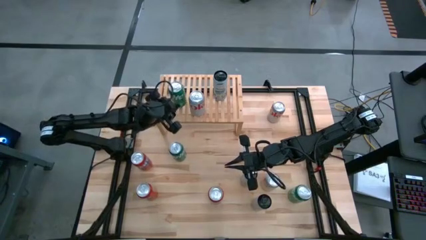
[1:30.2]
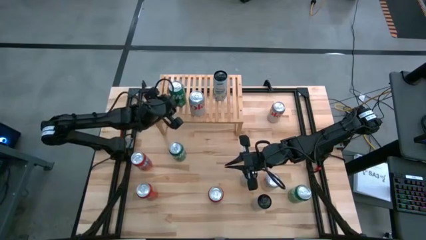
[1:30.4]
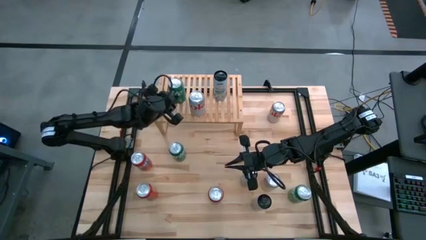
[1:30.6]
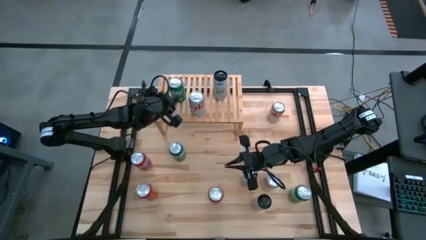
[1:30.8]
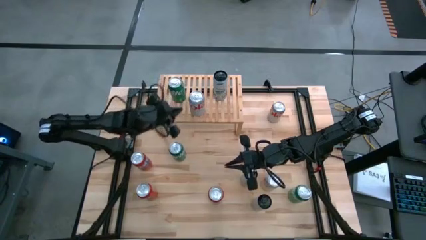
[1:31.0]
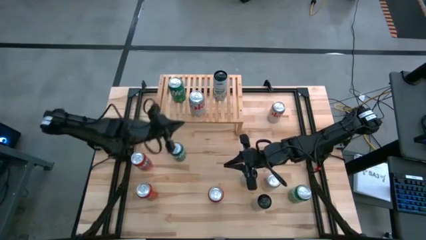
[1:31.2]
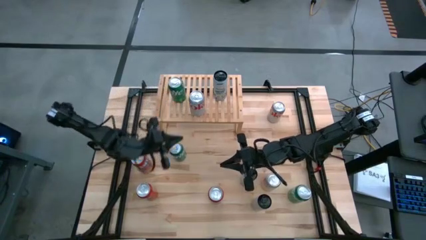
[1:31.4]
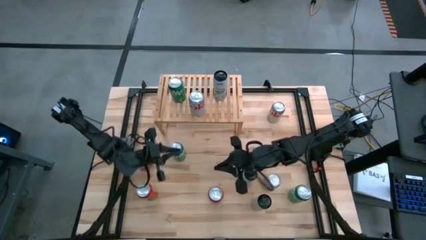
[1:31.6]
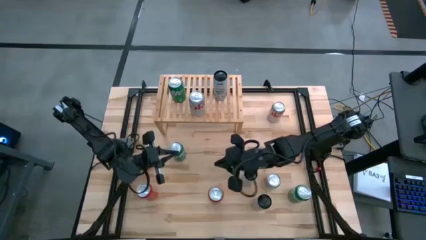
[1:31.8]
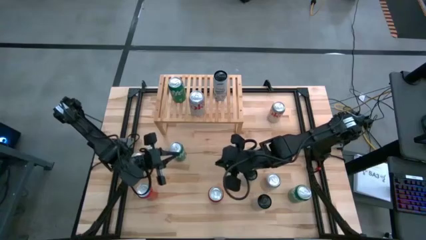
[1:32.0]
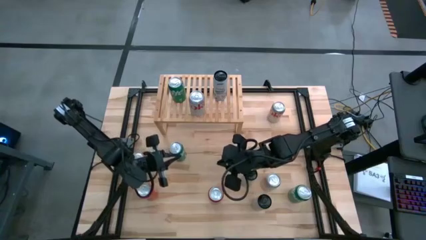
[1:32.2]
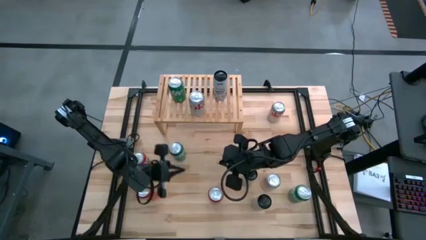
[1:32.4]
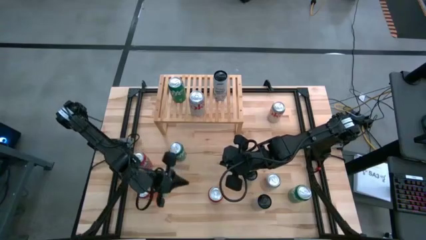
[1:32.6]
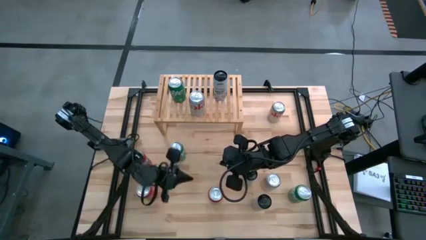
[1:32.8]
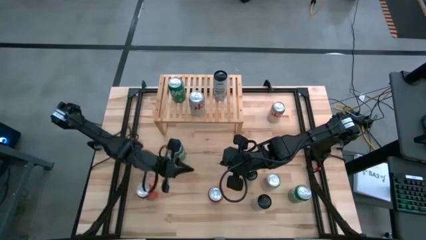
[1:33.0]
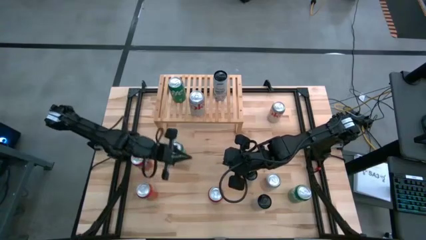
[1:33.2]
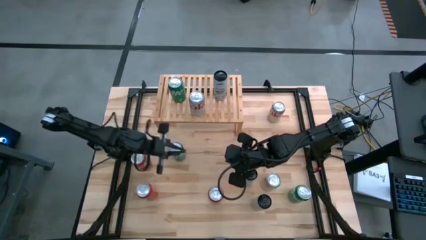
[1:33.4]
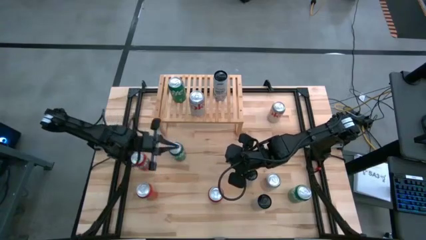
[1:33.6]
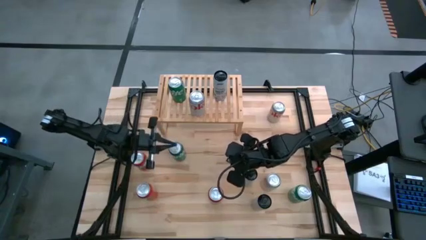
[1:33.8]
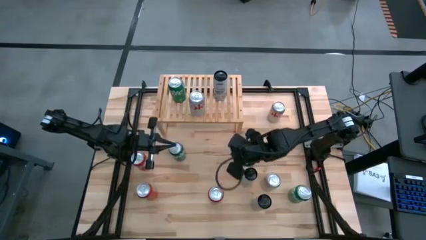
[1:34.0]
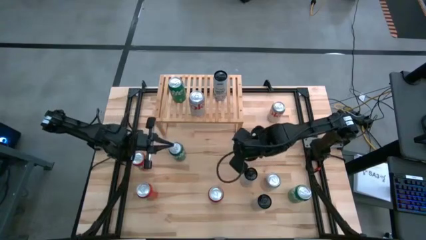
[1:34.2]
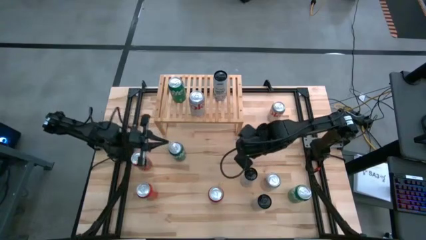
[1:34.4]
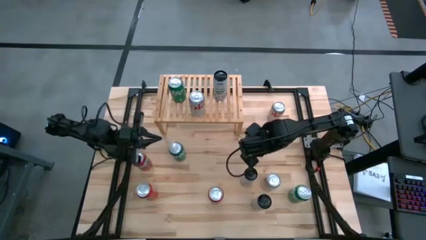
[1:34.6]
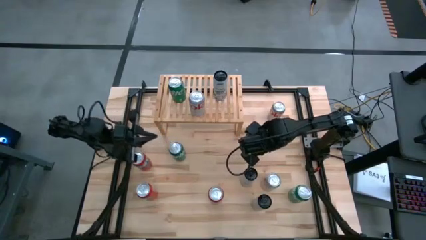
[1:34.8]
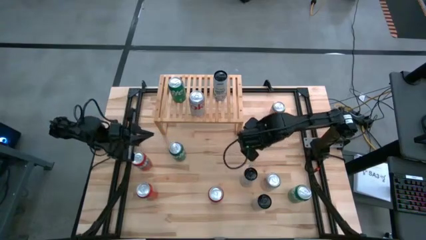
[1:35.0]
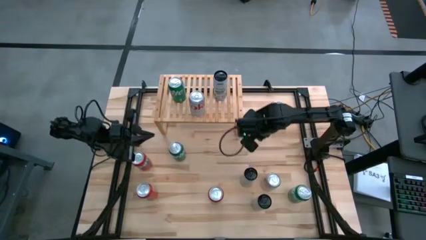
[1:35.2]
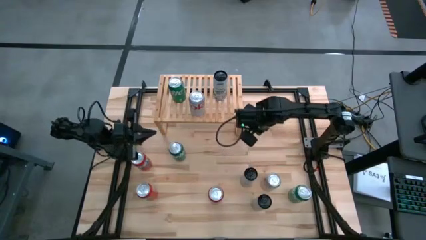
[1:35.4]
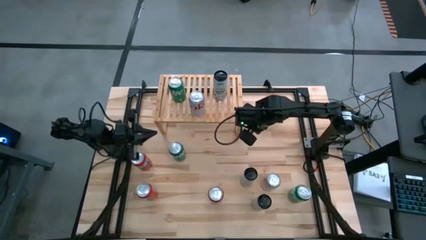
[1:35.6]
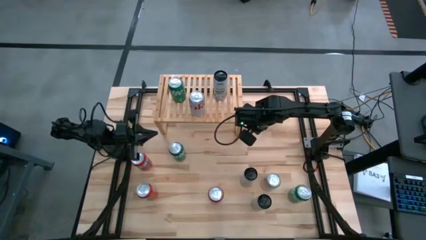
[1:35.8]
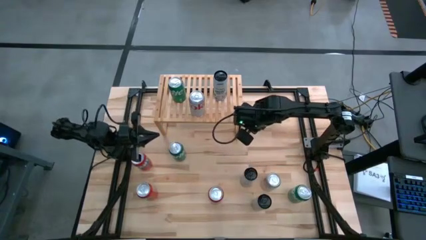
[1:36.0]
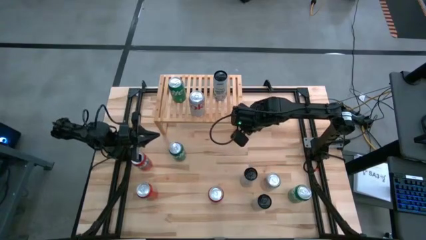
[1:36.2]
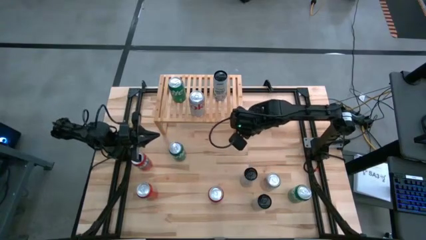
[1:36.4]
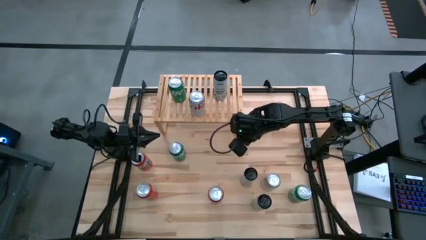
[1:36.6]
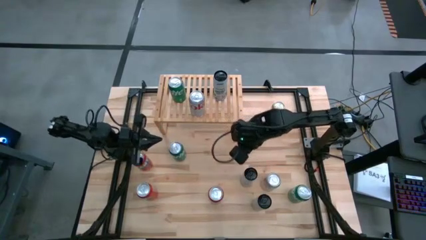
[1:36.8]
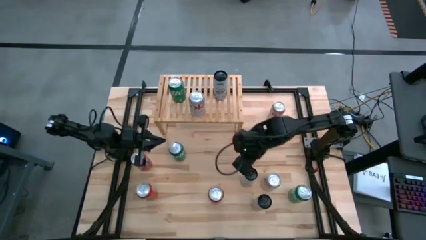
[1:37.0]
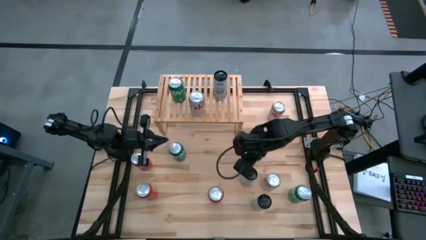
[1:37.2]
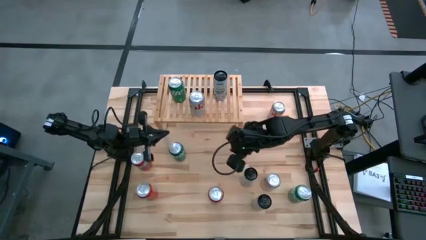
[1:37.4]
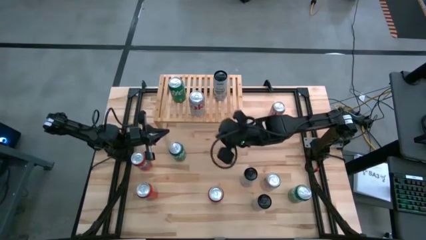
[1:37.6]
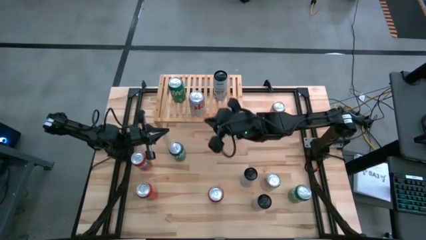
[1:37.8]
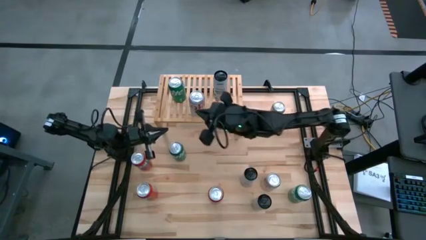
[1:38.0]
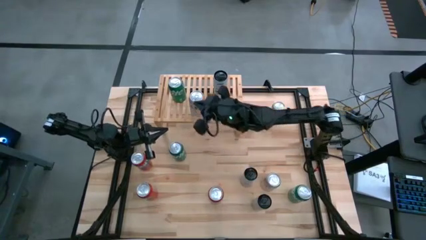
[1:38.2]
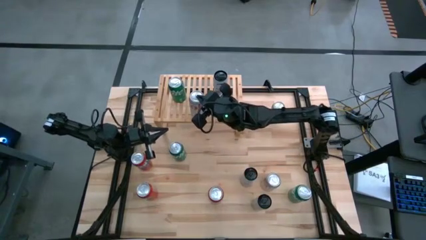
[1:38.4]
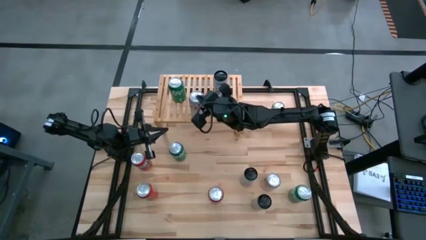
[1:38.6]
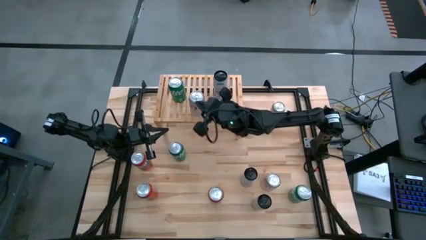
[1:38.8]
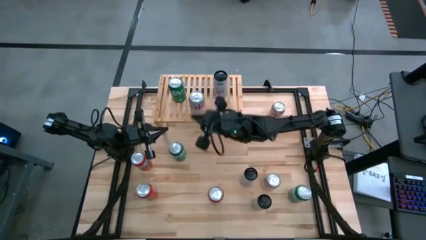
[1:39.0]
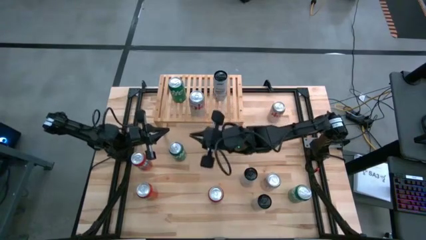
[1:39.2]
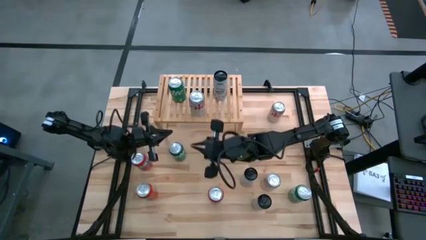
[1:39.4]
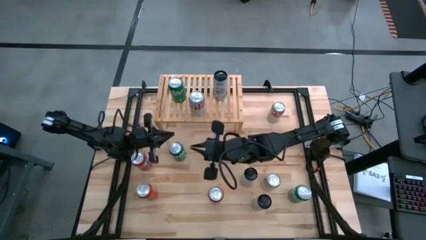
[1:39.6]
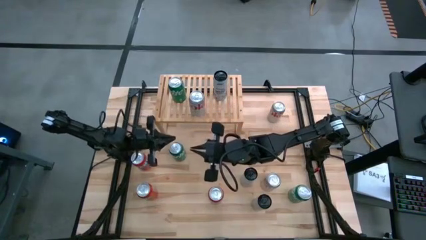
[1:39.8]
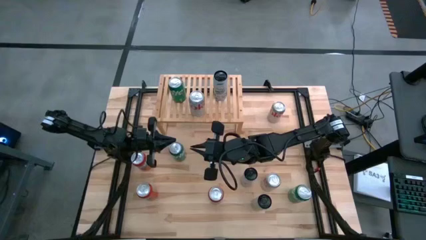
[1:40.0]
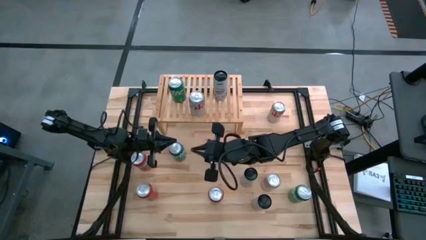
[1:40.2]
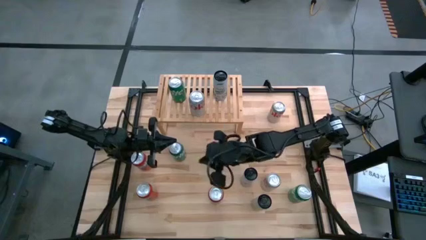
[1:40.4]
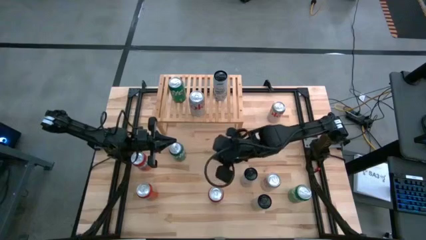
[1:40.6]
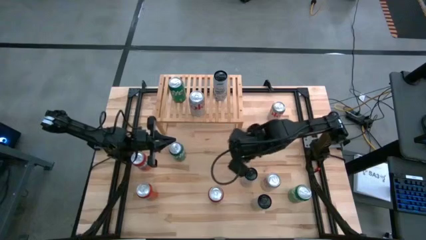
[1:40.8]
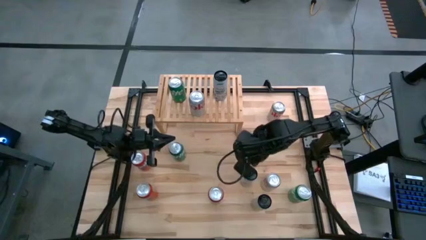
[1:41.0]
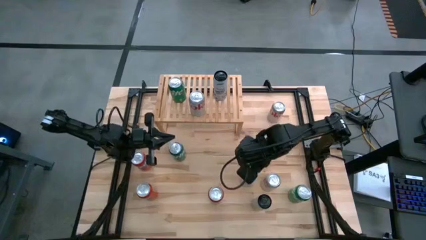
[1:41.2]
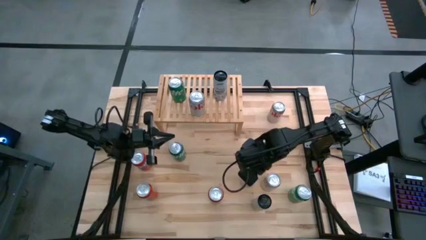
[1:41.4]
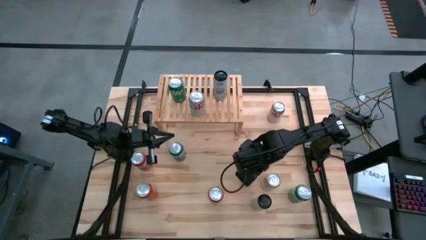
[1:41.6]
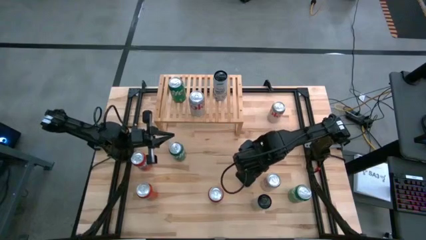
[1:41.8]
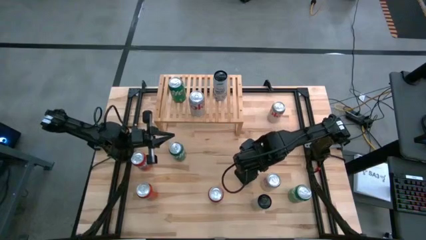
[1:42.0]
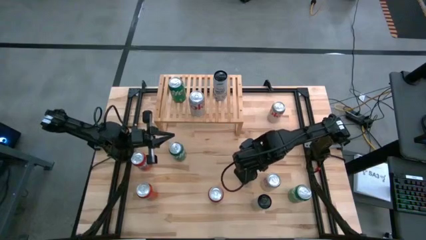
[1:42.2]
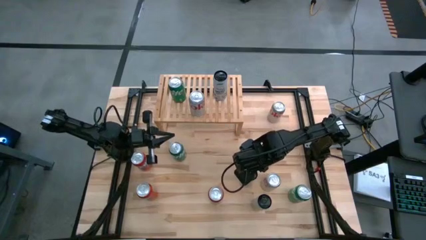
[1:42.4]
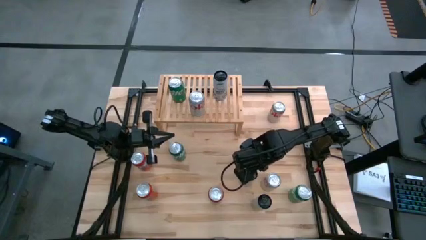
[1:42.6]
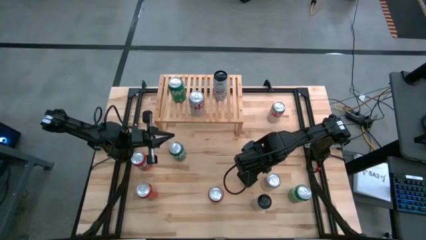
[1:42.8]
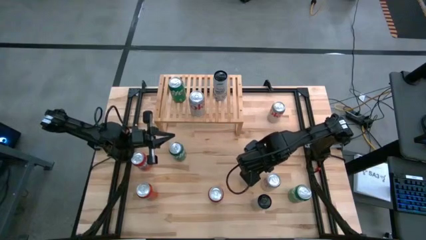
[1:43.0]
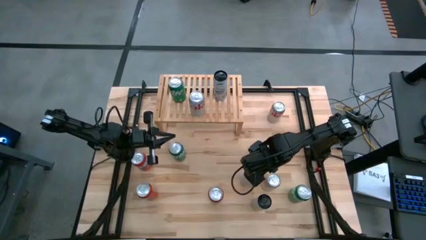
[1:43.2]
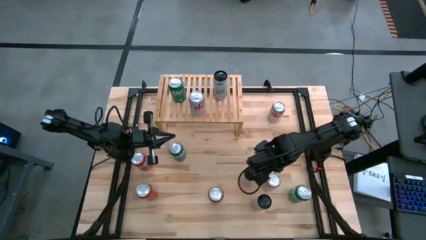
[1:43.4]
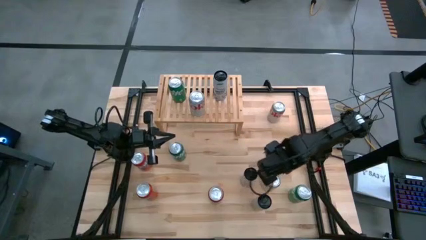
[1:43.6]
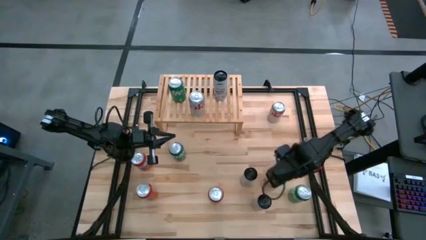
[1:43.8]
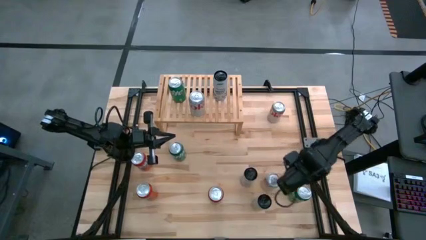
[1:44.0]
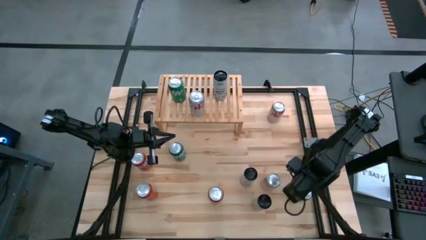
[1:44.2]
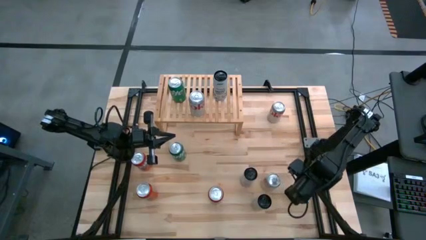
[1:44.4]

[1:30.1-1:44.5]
Task: Place canned beverage on shelf
Put the bottom green soda can on the shelf

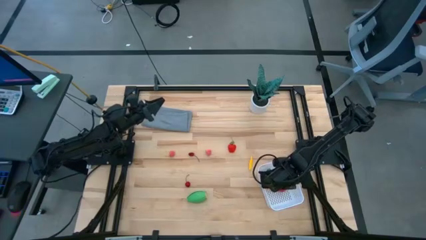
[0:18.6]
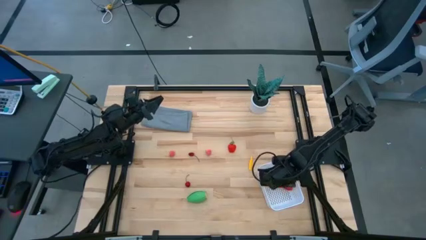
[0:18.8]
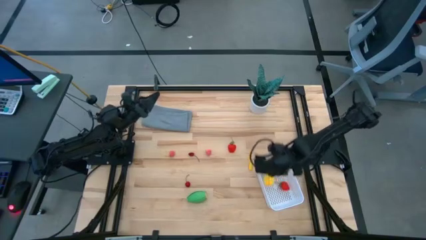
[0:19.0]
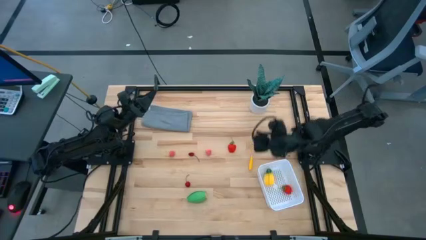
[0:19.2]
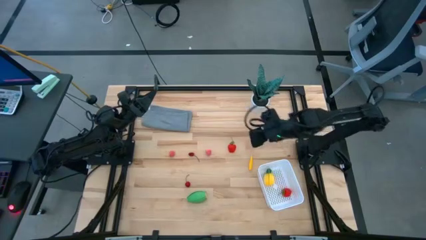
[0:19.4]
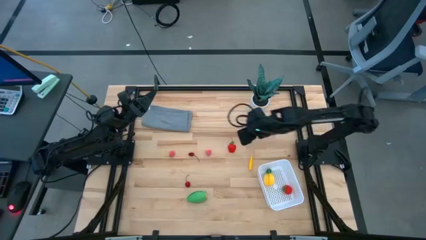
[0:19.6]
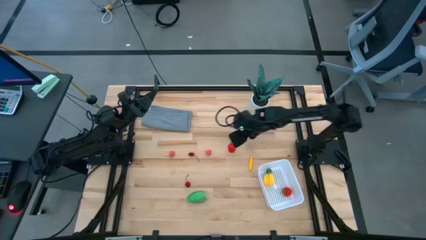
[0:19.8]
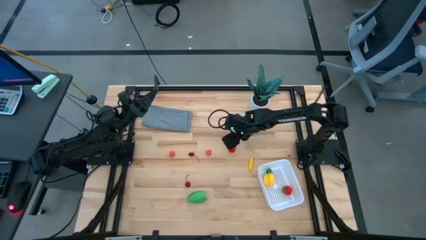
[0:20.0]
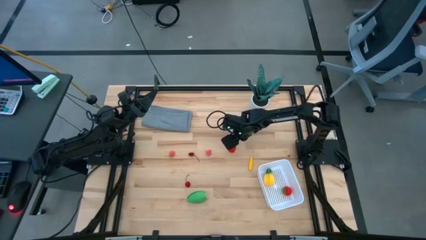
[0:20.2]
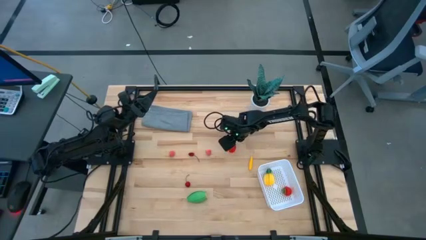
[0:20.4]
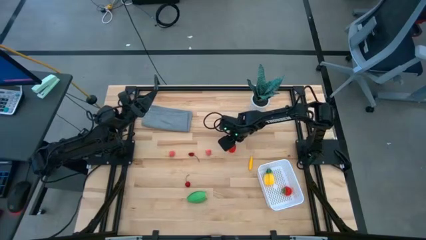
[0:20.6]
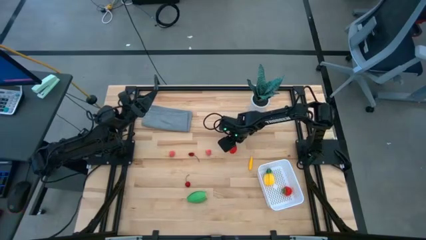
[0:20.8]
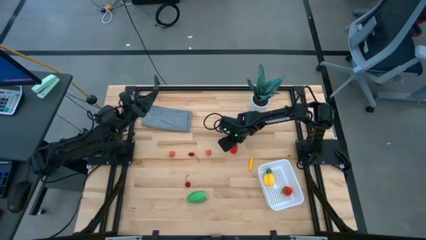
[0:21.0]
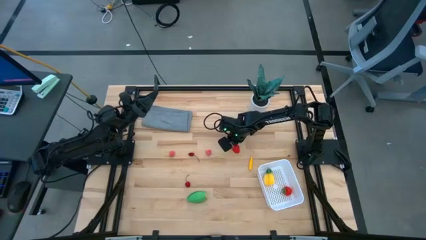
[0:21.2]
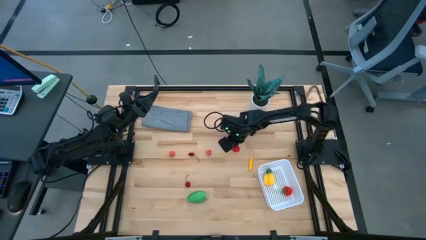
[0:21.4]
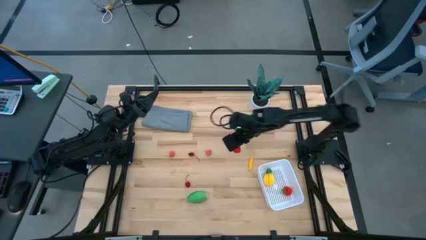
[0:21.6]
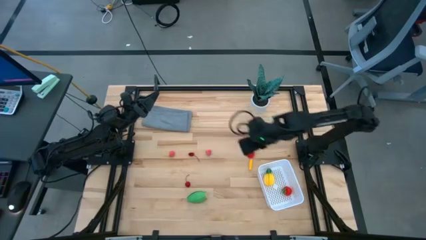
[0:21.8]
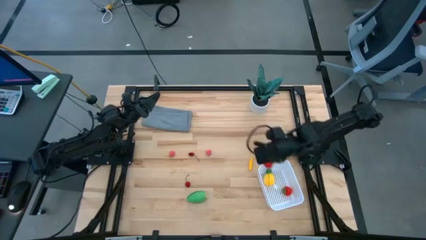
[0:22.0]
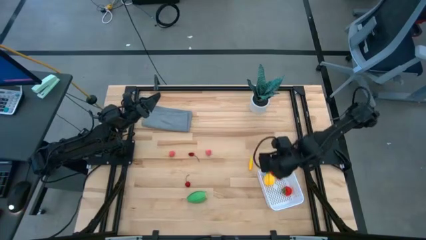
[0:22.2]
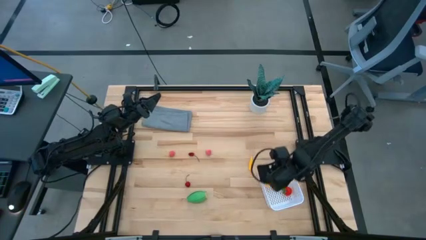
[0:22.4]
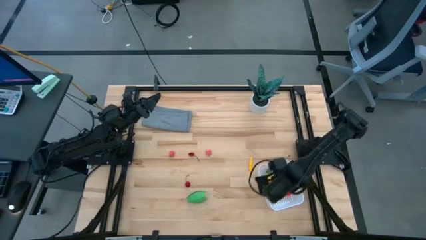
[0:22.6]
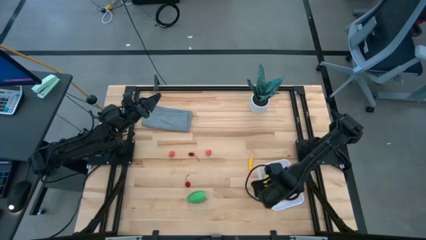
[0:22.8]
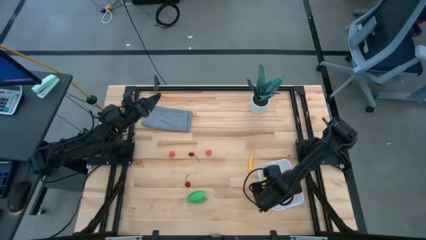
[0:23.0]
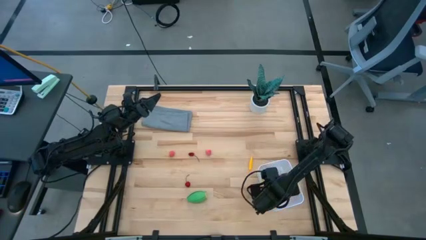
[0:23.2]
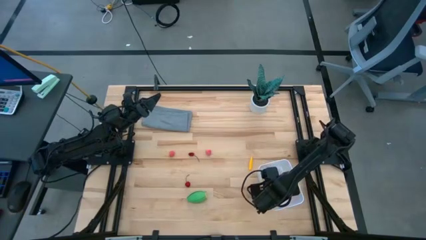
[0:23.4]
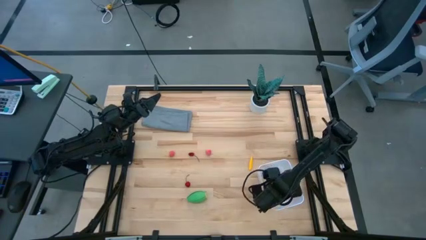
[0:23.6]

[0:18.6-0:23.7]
Task: Pick and placing Produce into tupperware
Put the strawberry into the white bin
